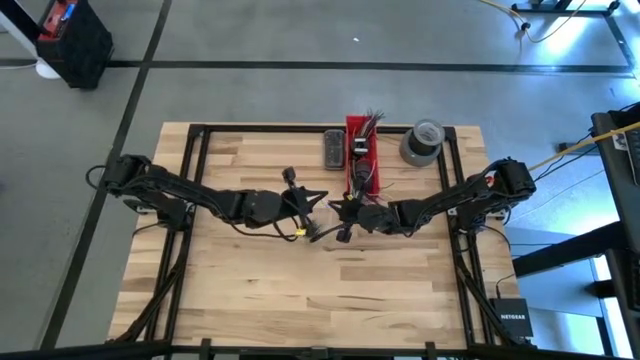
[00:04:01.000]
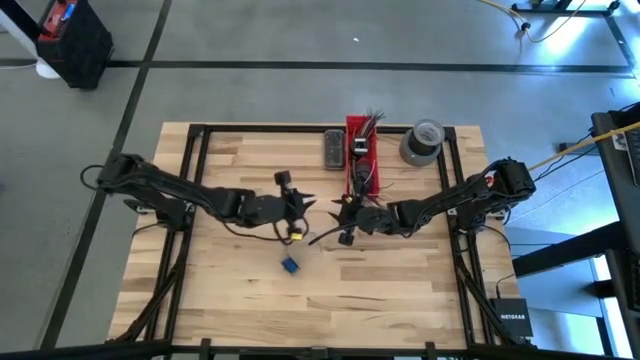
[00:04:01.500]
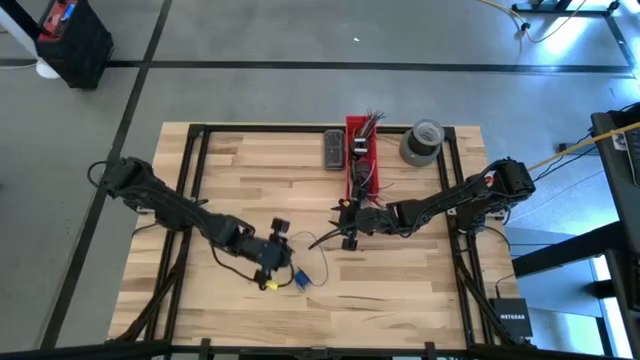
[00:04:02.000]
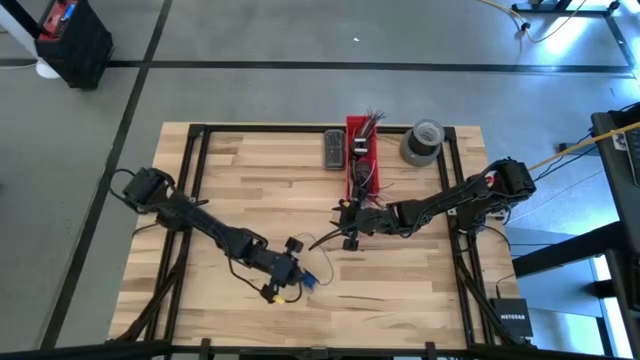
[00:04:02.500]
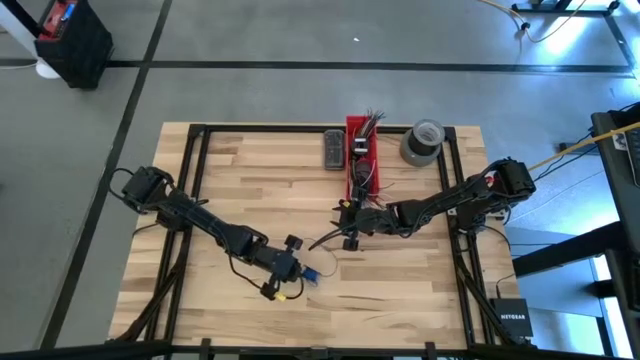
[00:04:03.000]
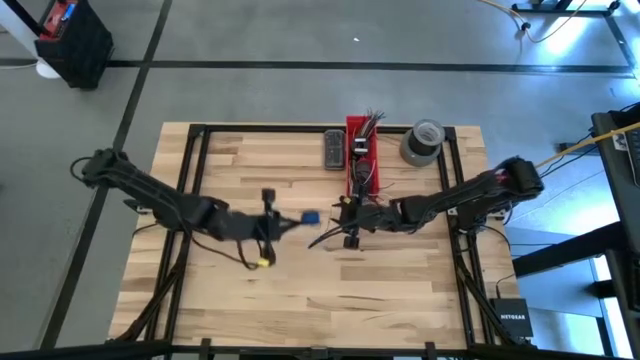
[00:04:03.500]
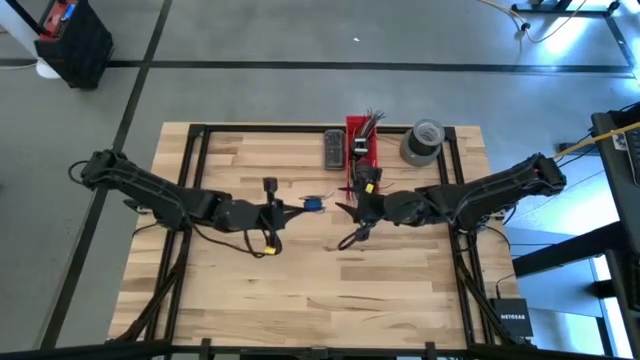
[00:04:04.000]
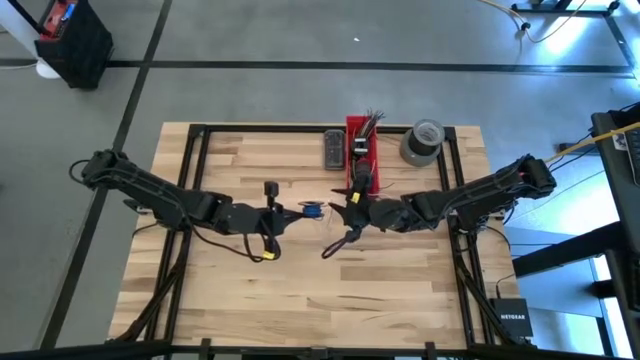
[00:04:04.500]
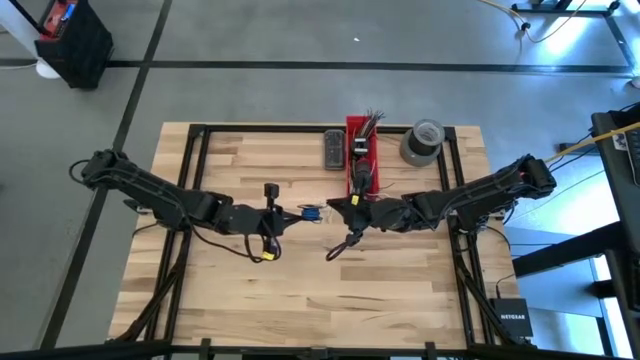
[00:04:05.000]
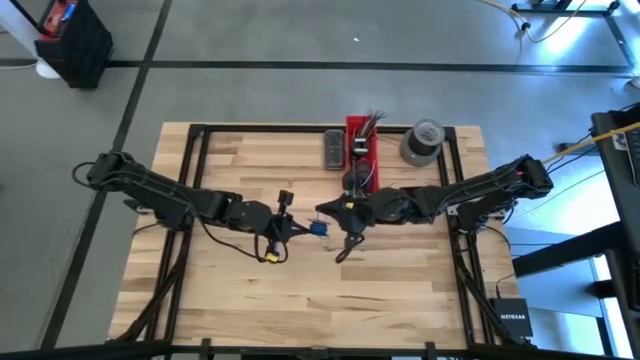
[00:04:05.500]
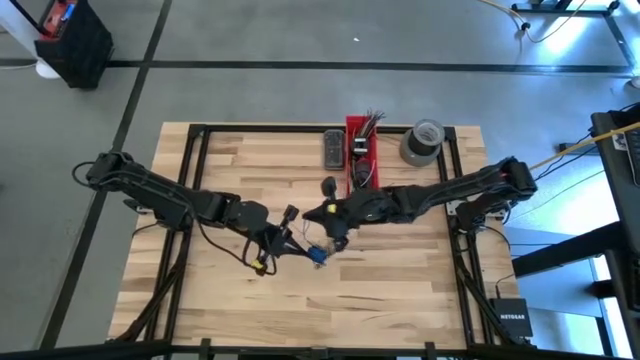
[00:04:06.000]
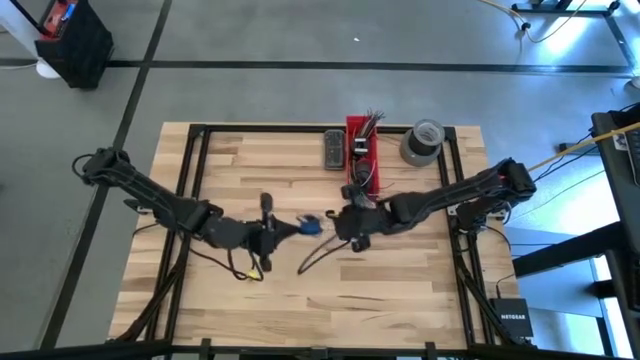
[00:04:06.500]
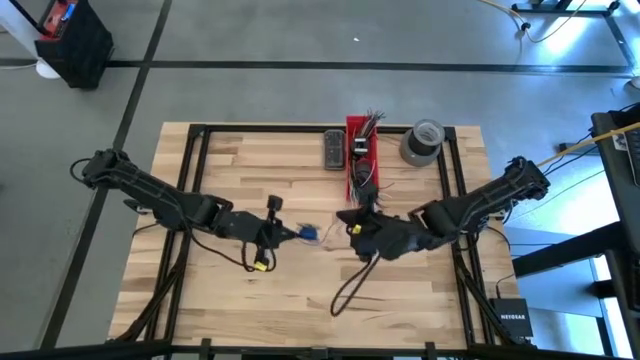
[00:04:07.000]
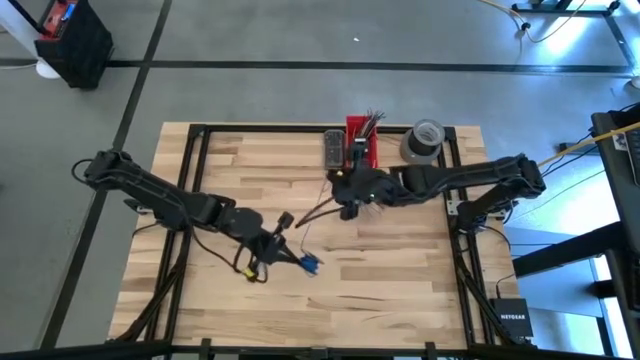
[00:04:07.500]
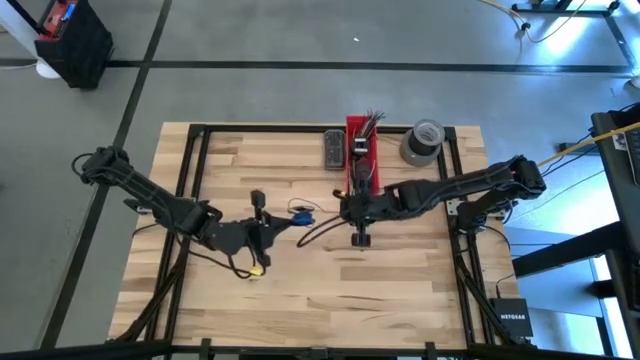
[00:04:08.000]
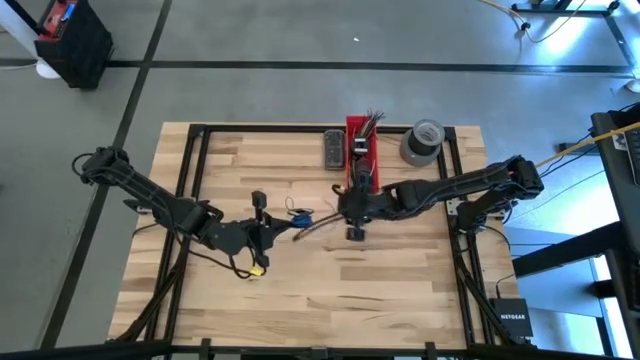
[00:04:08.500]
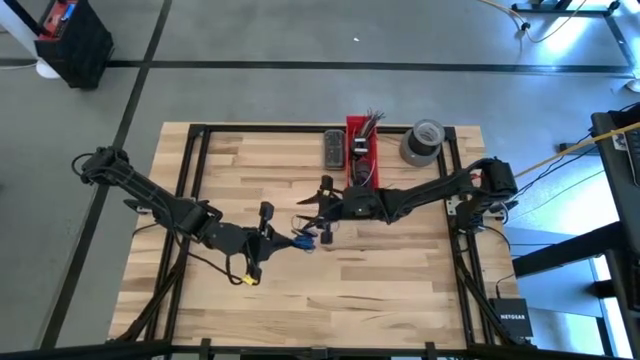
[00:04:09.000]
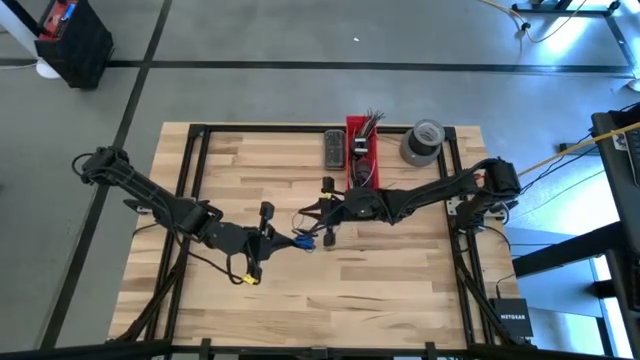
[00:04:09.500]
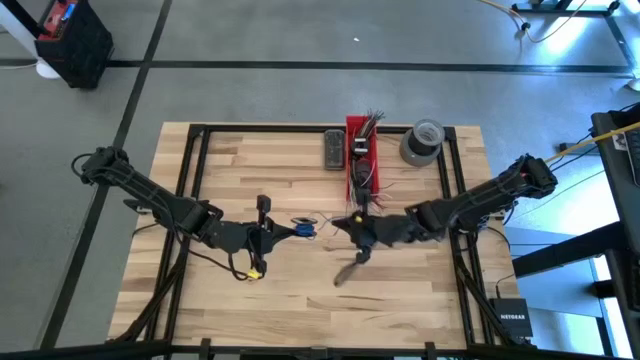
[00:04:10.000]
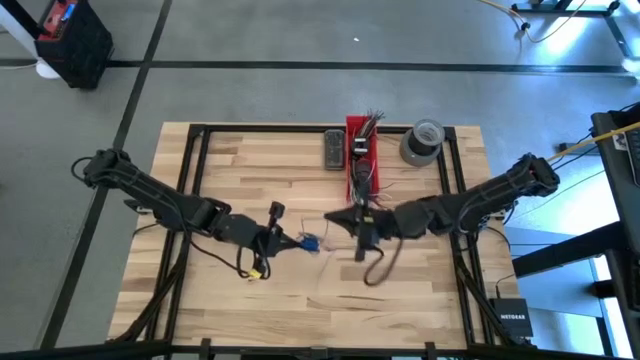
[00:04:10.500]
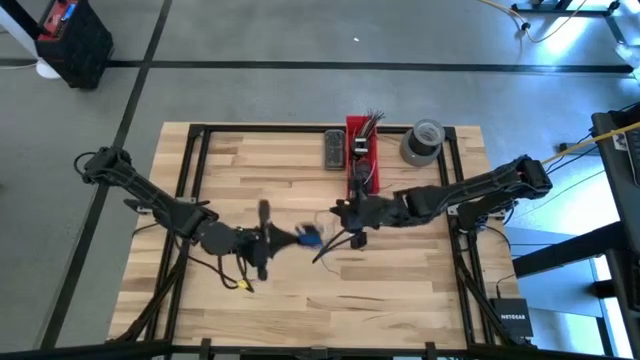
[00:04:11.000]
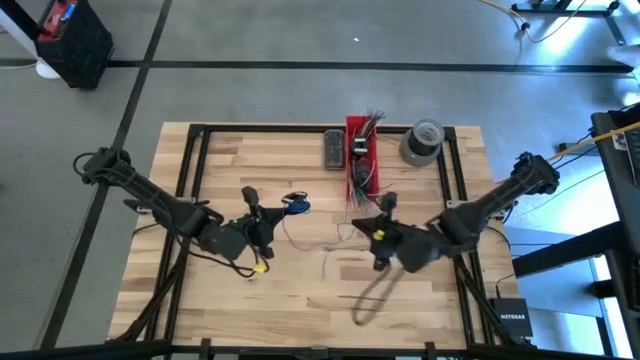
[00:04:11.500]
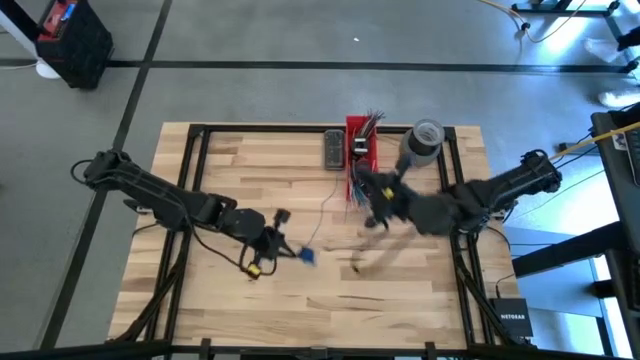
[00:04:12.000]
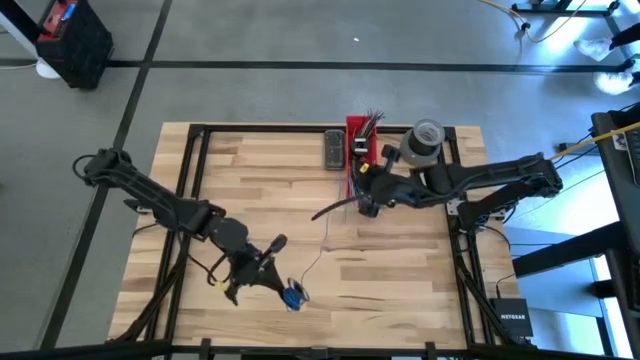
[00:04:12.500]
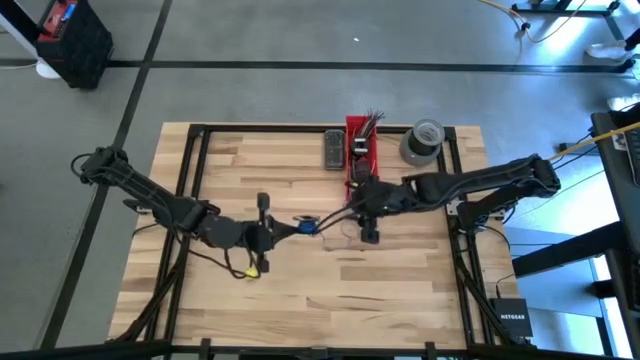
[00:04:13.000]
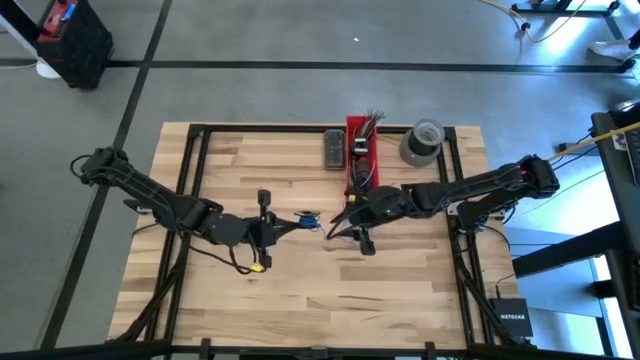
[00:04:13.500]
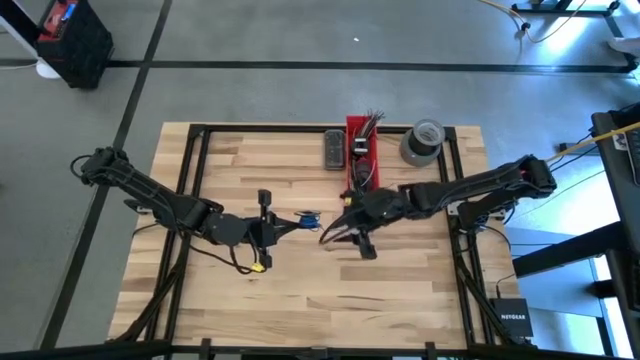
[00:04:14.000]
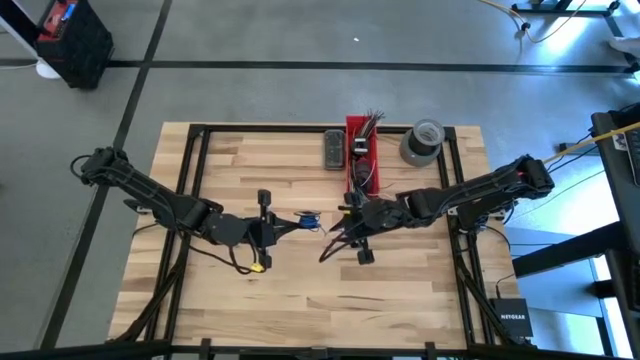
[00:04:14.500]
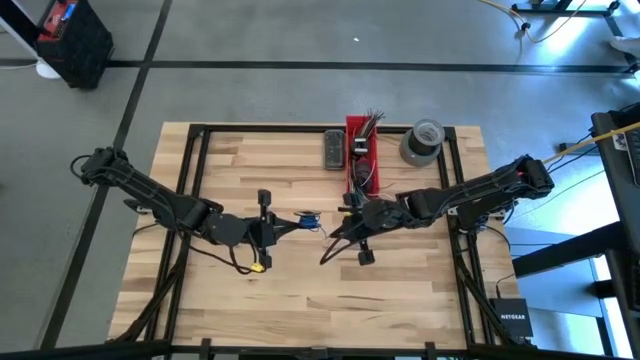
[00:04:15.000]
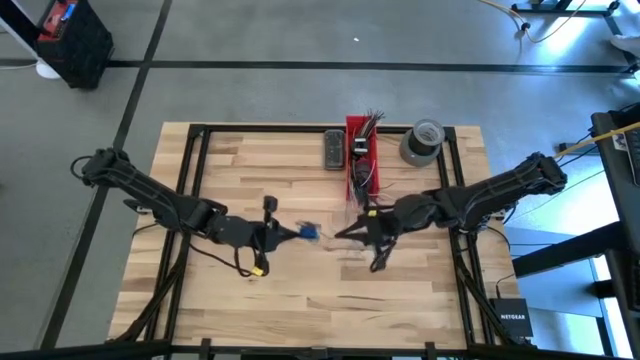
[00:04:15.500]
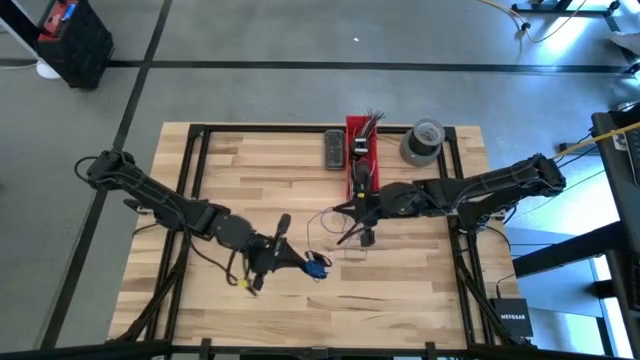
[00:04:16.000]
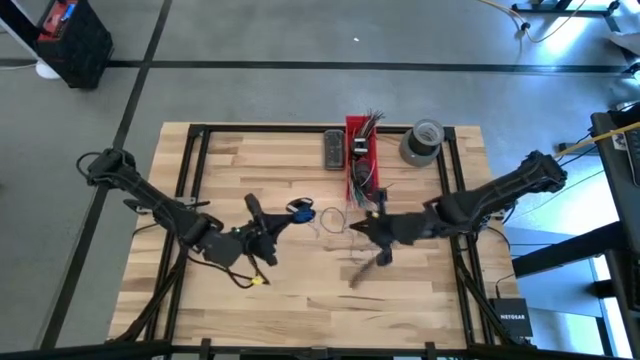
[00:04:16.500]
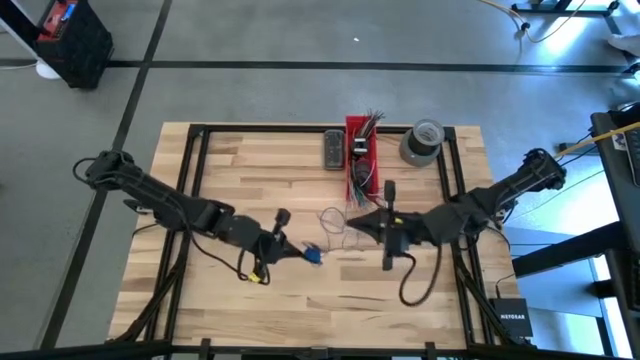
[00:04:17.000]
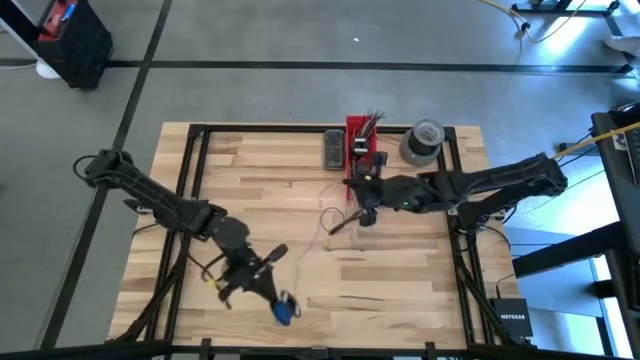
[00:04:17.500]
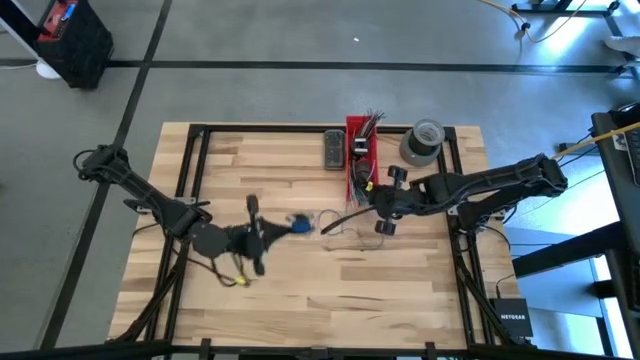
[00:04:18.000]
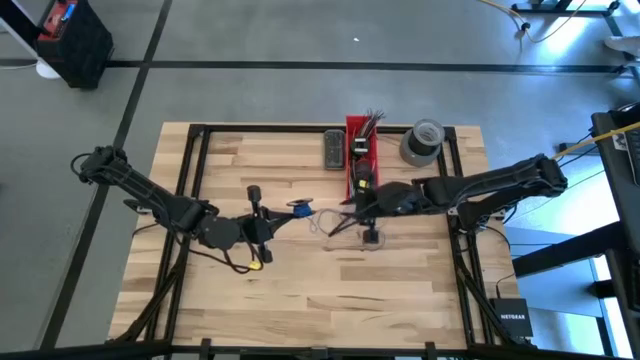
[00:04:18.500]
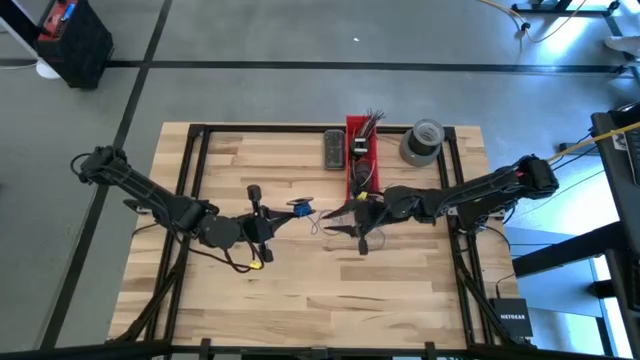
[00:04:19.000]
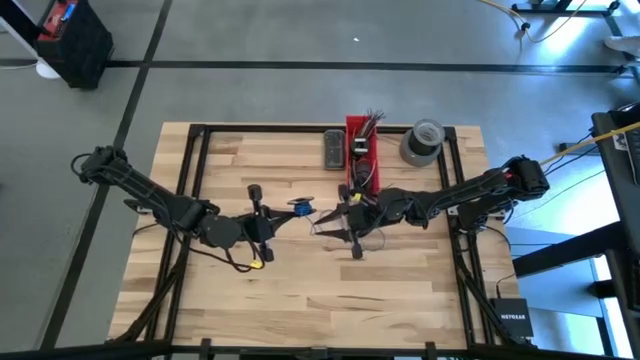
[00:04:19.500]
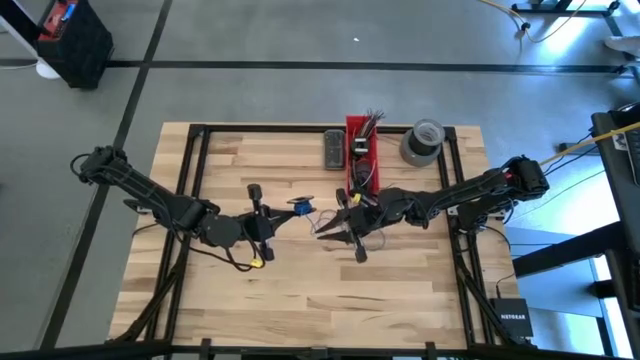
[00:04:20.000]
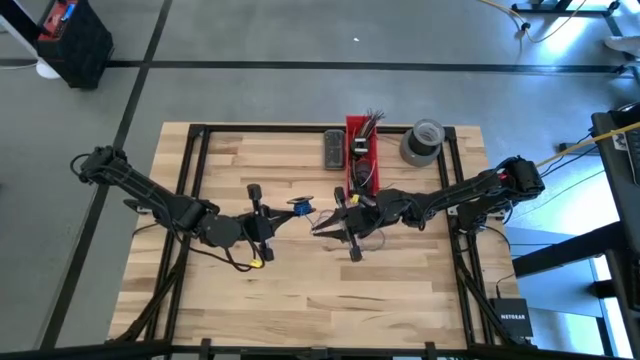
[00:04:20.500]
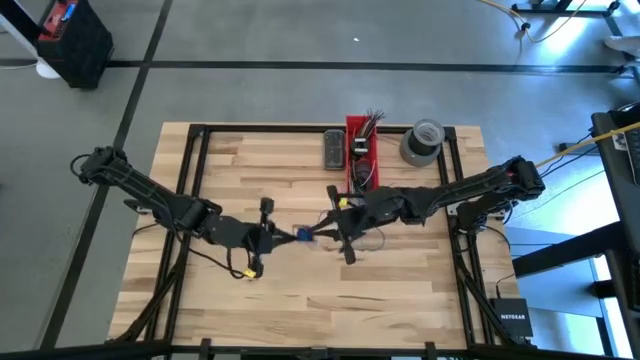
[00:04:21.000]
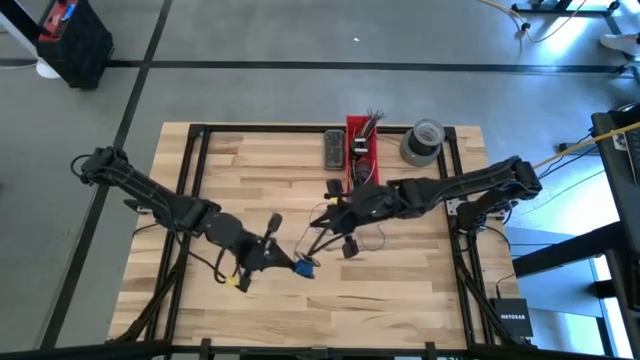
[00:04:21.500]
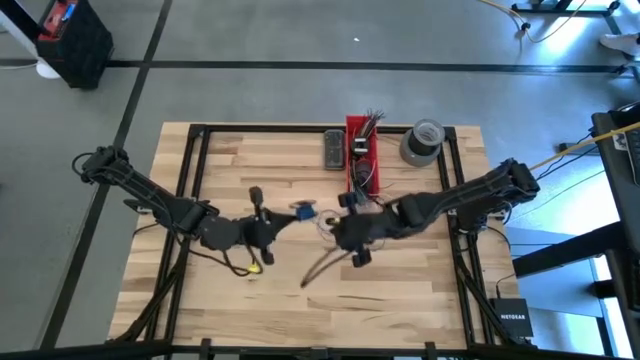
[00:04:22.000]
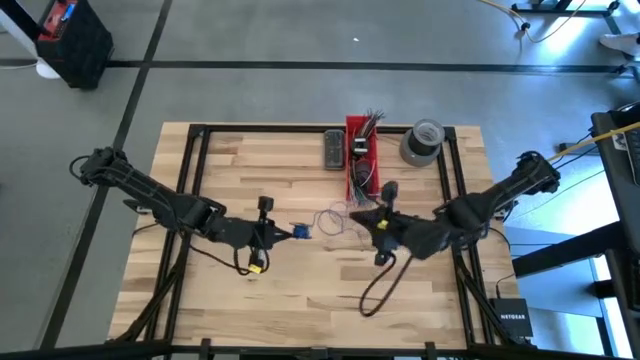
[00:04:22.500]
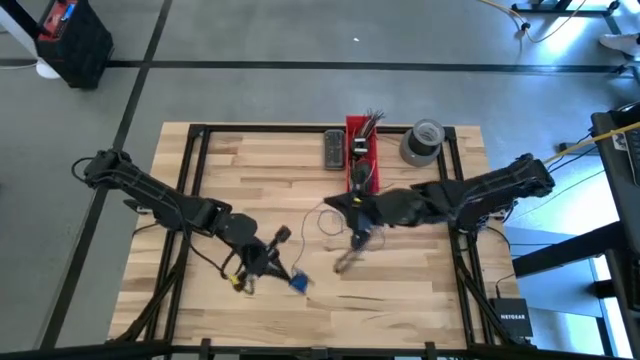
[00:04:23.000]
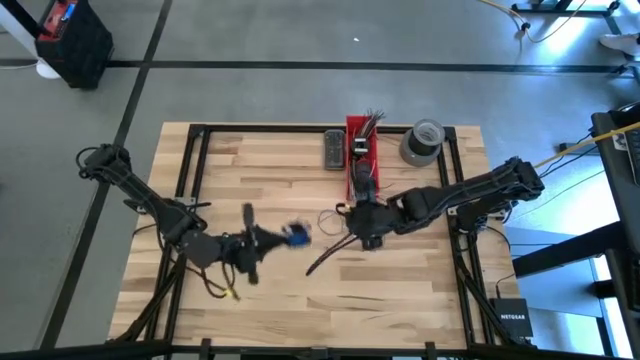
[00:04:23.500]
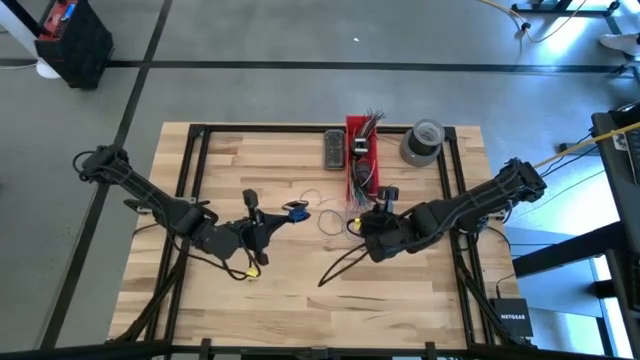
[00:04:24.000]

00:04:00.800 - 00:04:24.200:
Task: Coil cords
Uncoil the blue wire from the black spool
